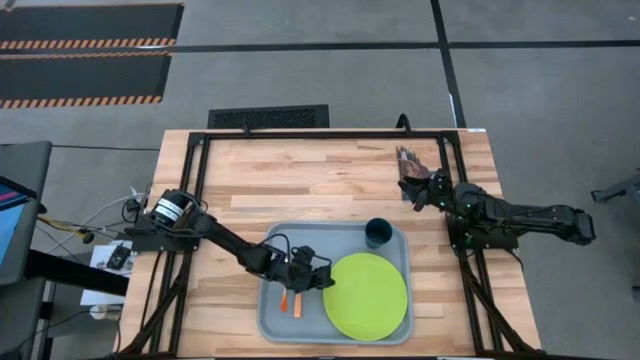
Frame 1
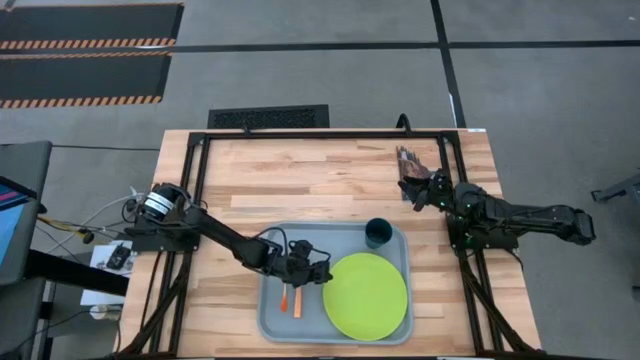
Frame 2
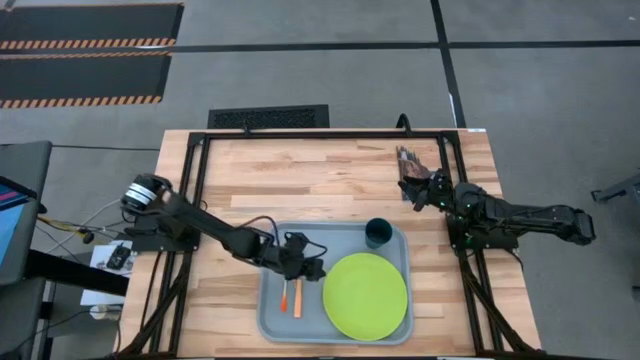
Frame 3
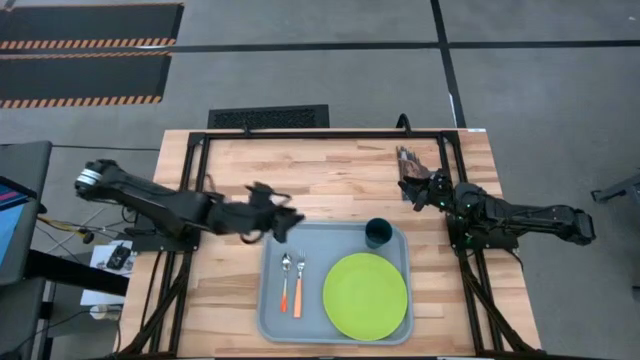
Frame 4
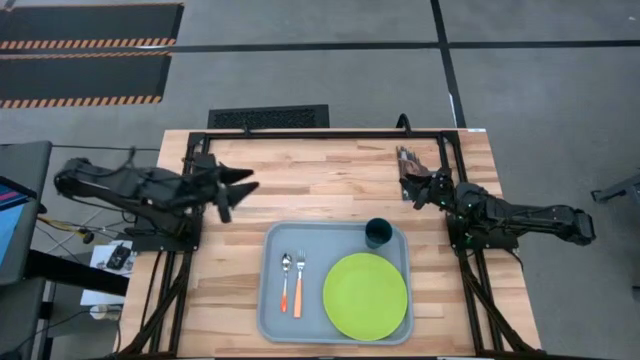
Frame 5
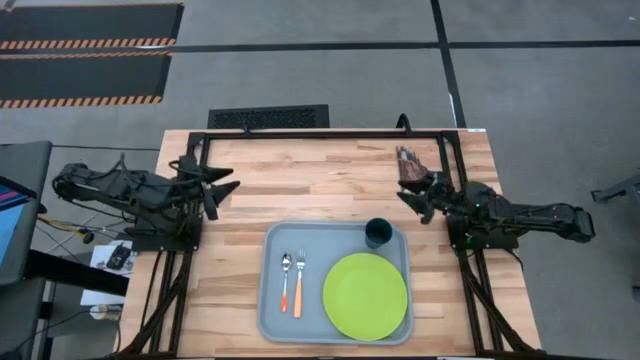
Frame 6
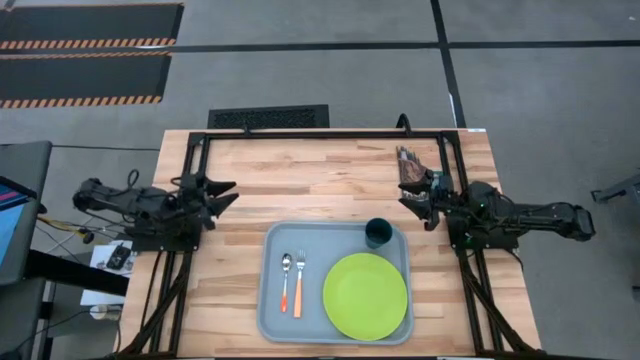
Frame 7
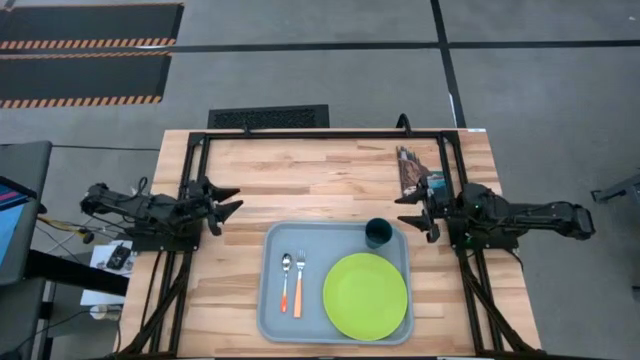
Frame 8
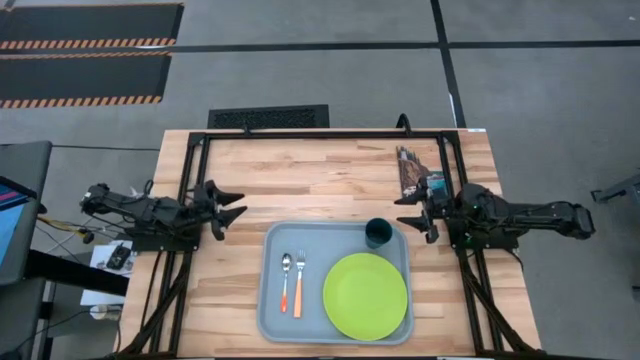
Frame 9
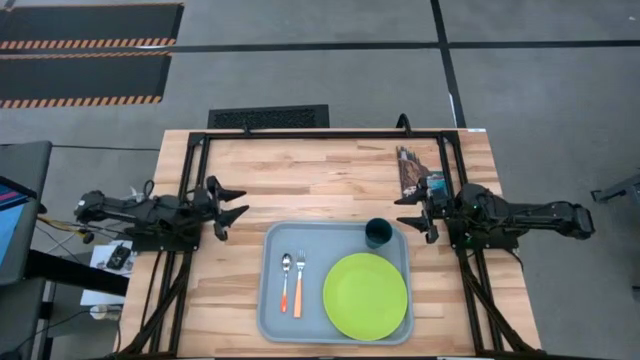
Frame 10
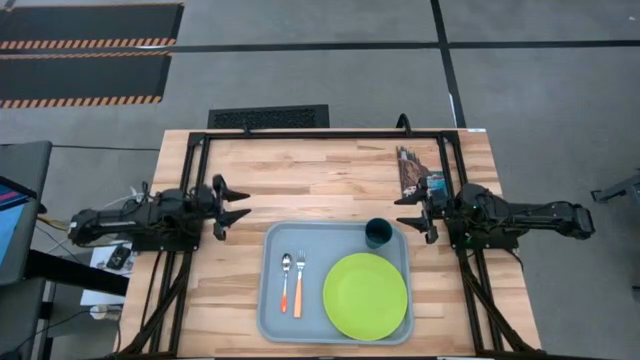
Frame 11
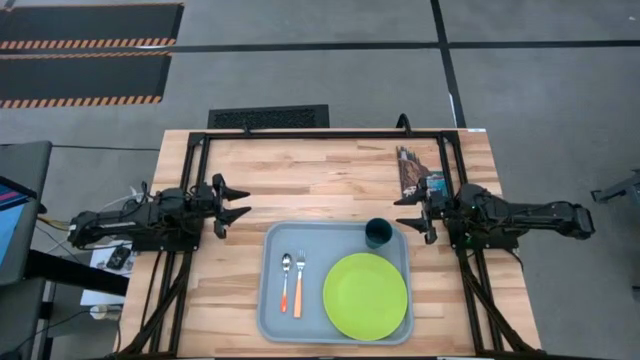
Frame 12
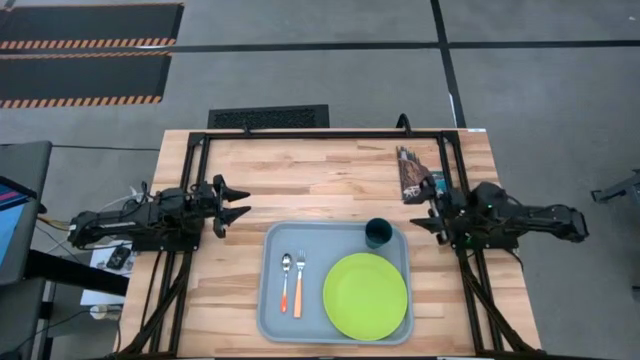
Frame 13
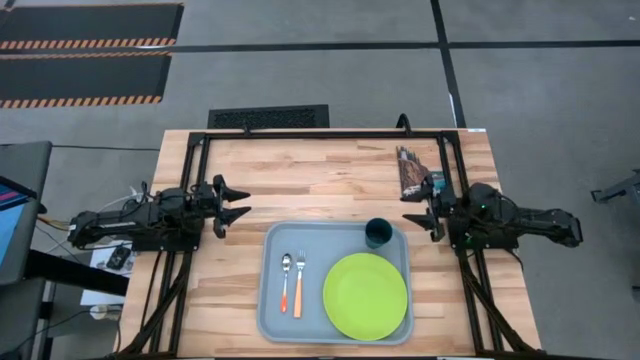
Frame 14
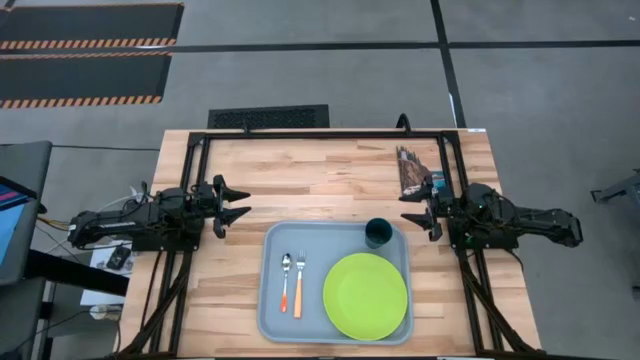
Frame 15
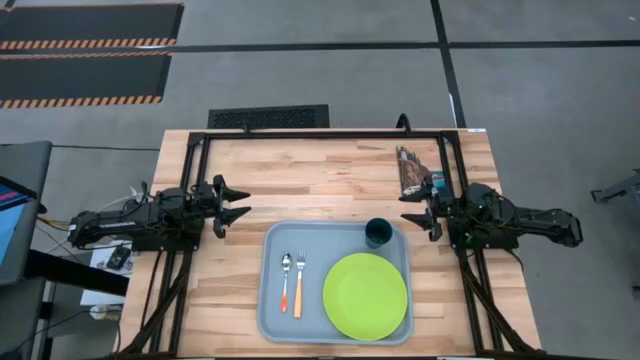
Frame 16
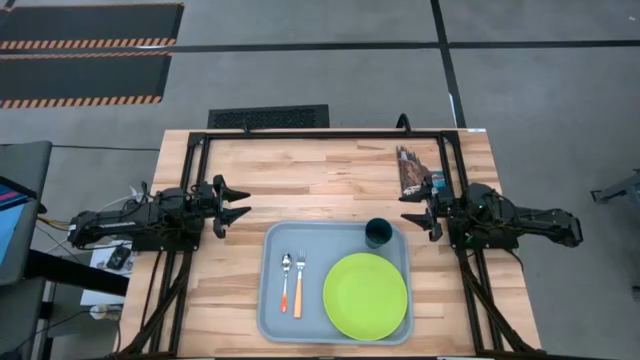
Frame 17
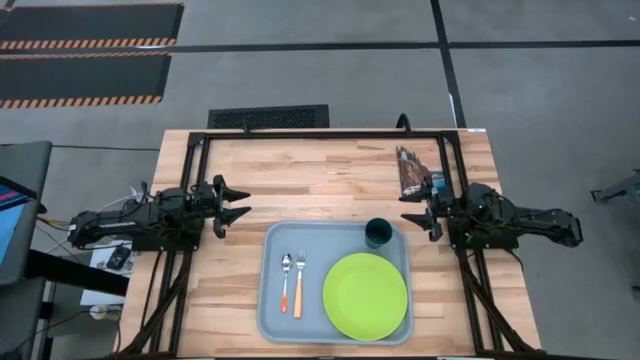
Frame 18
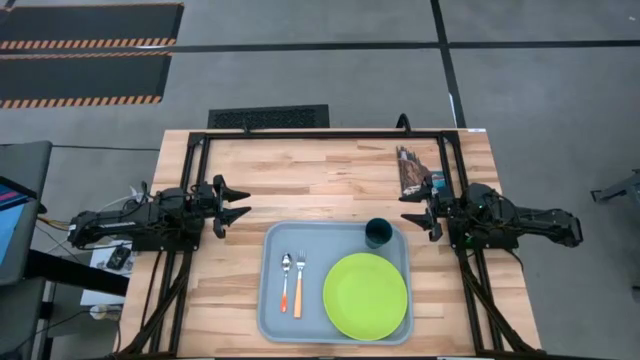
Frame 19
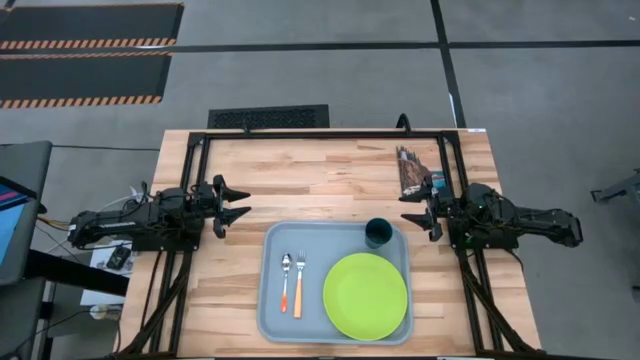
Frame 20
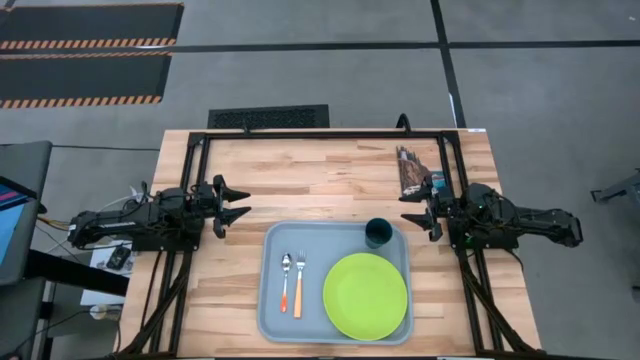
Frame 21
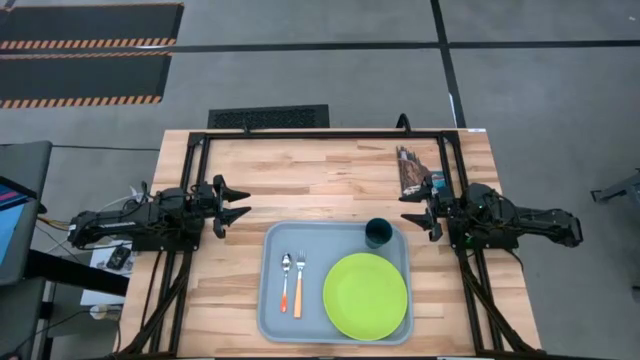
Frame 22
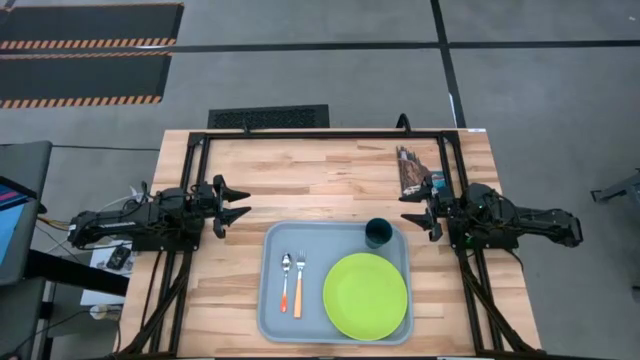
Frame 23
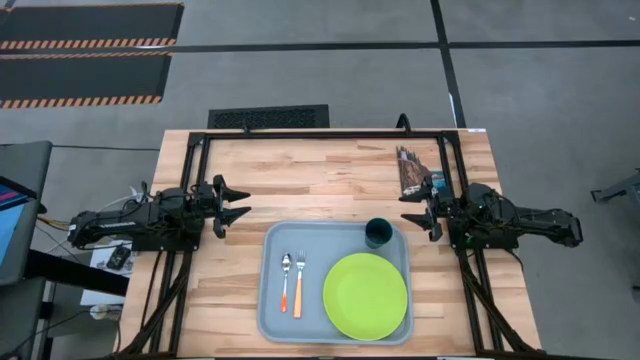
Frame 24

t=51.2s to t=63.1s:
Task: Pick and place plate/cup/fork/spoon on tray
Return to Home Position

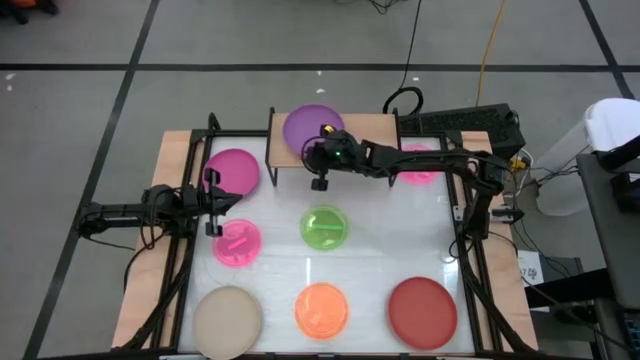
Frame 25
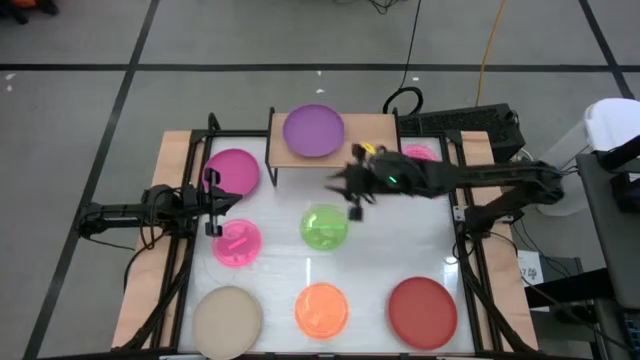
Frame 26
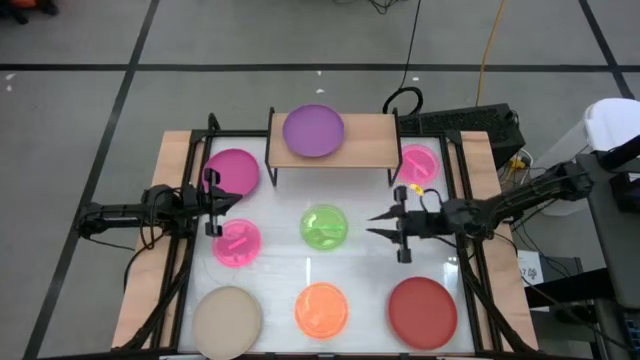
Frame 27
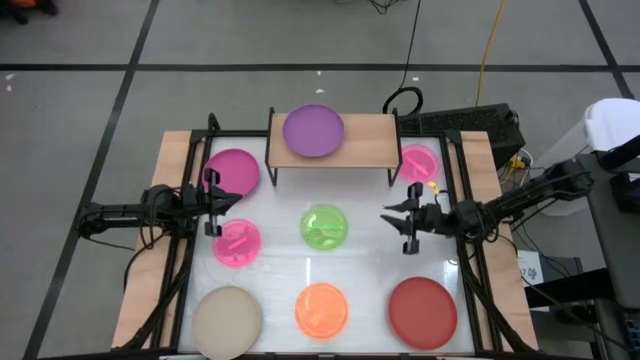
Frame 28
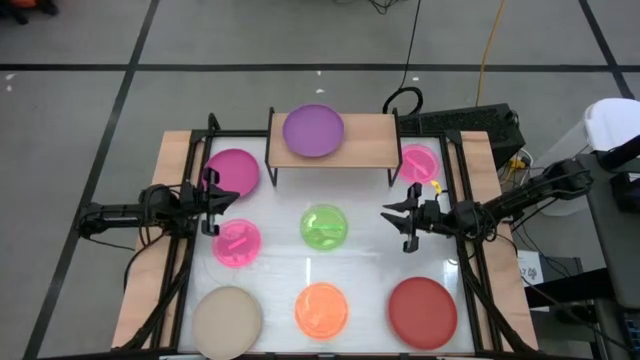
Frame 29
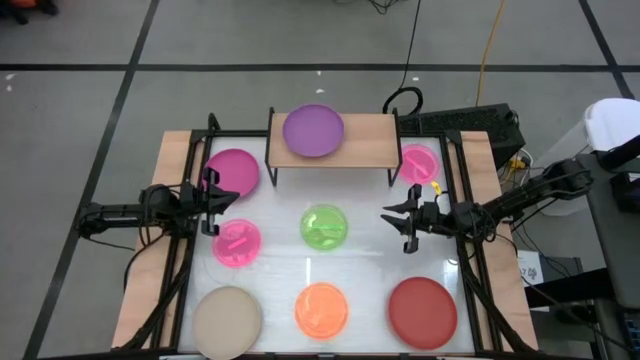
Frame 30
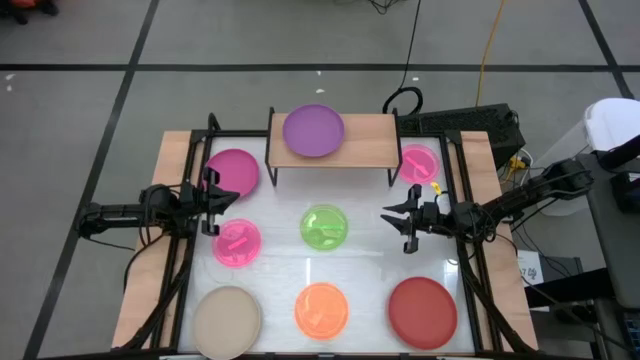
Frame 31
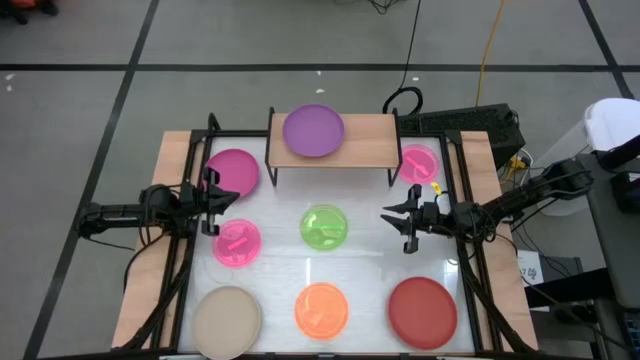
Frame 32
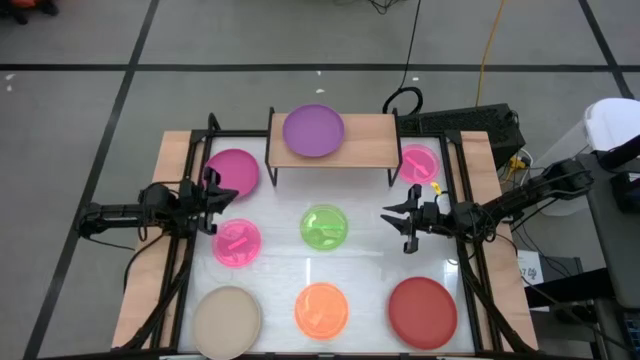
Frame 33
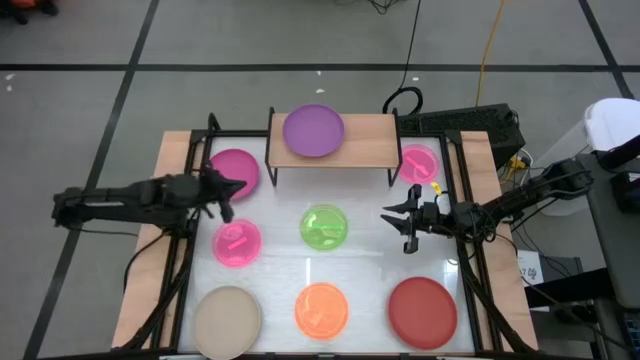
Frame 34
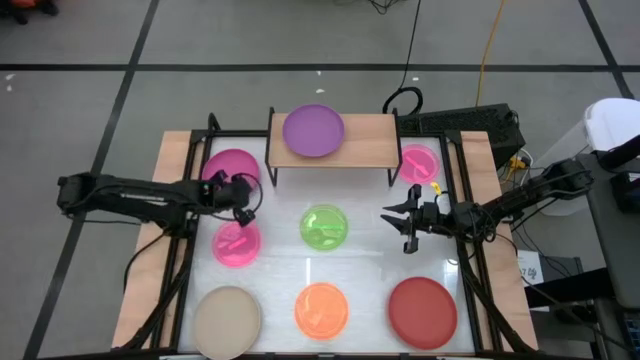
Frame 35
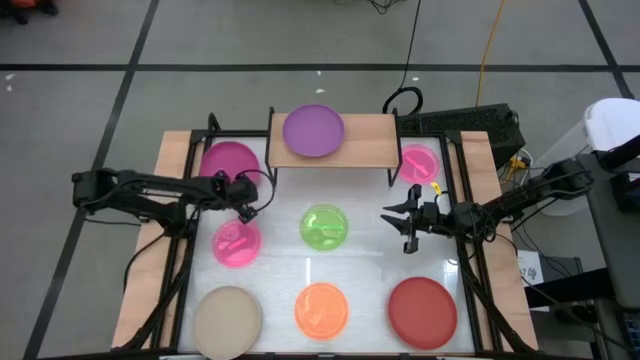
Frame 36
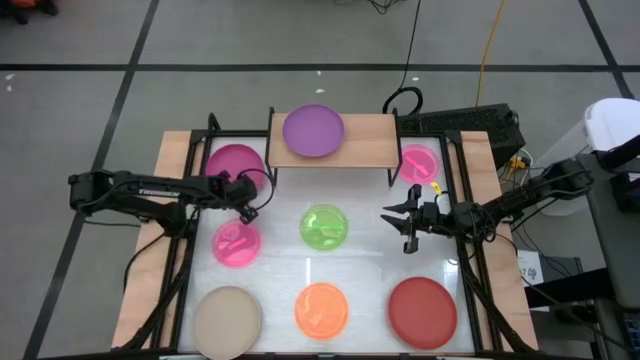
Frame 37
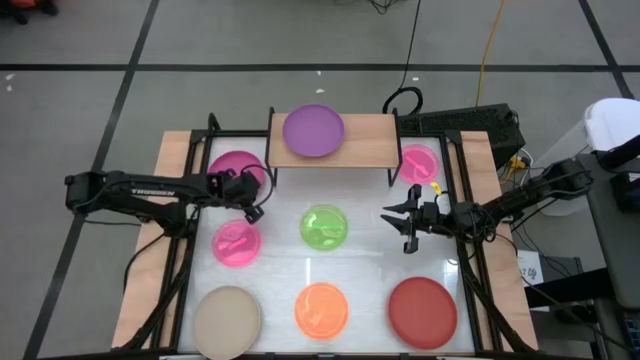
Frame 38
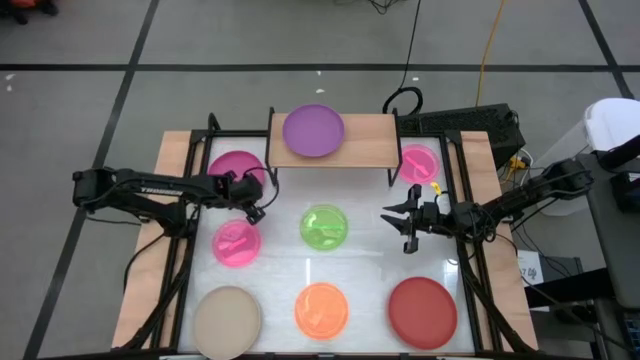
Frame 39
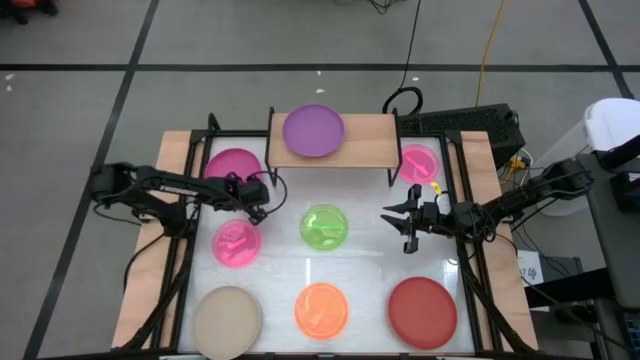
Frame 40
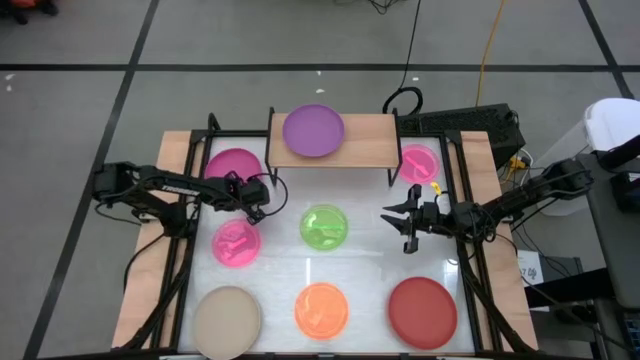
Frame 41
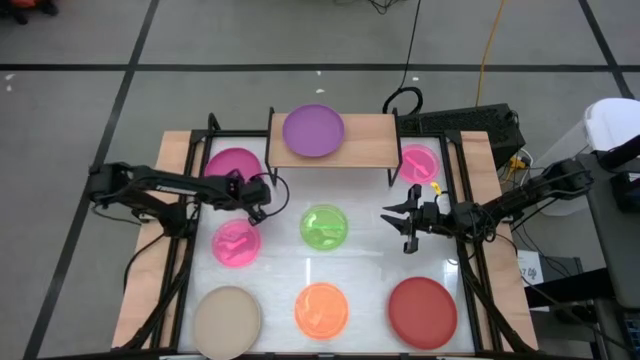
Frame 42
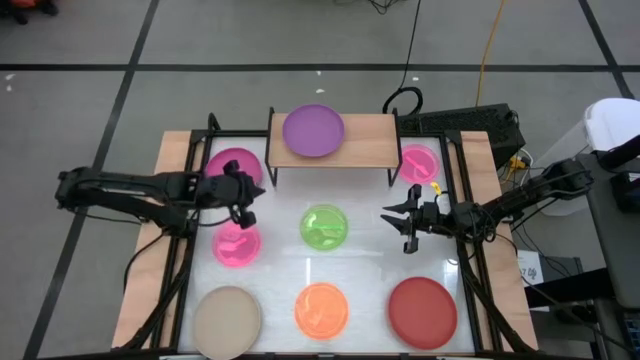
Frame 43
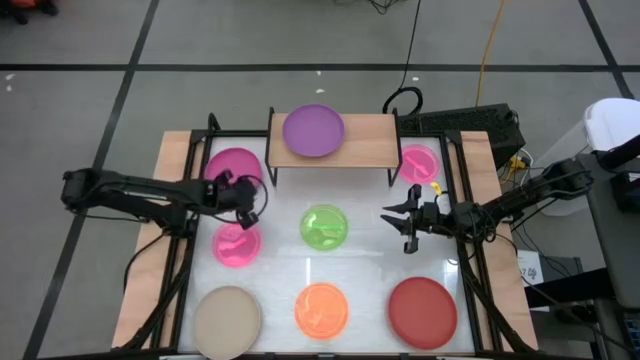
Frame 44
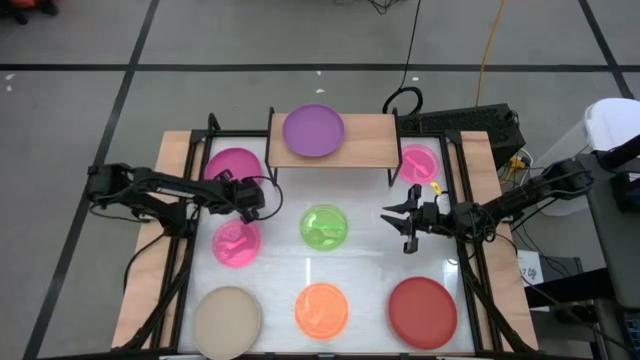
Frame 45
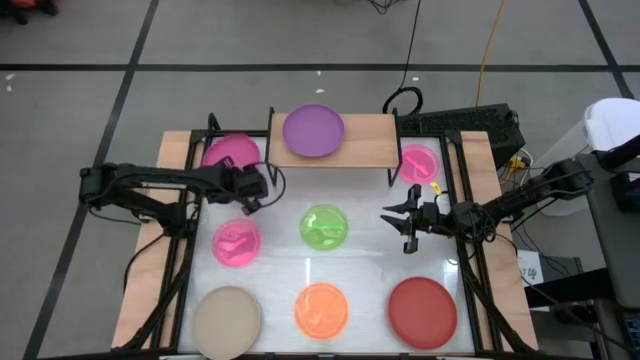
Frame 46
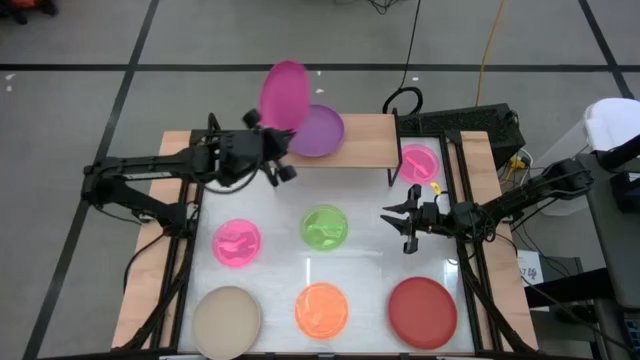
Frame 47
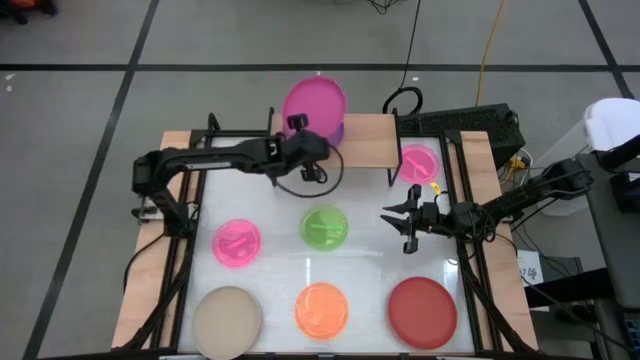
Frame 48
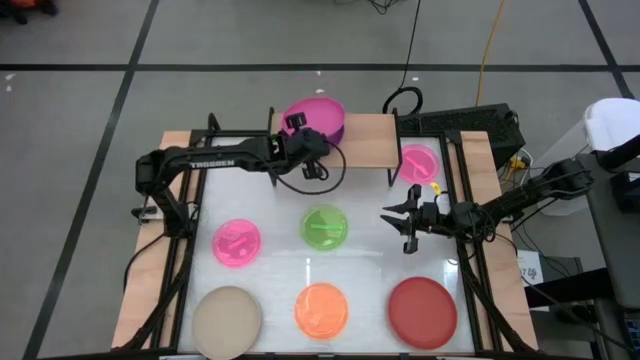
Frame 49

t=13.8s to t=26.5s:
Task: Place and stack plates onto a shelf
Stack the pink plate on top of the violet plate on the shelf
